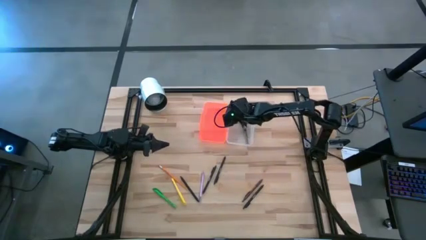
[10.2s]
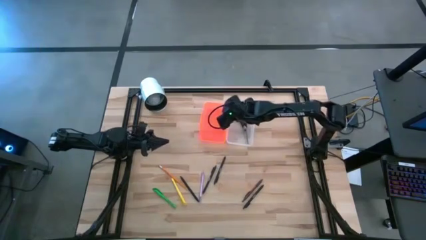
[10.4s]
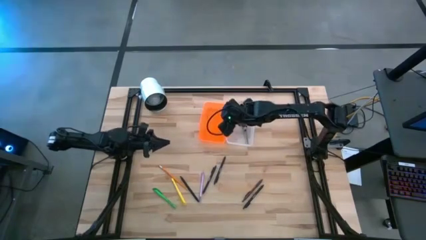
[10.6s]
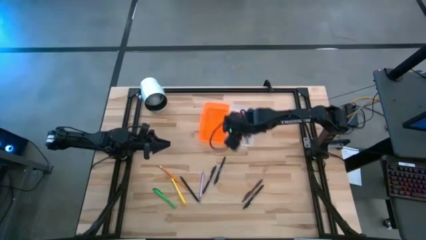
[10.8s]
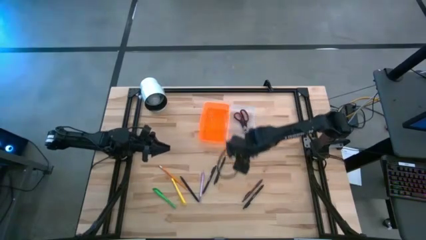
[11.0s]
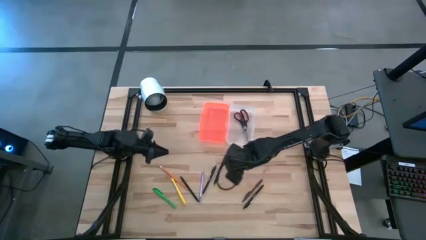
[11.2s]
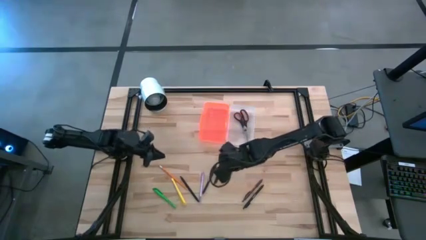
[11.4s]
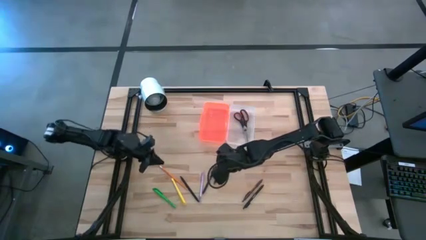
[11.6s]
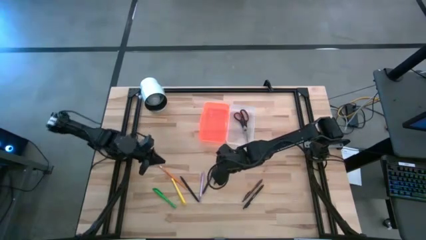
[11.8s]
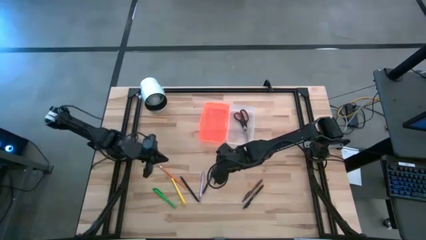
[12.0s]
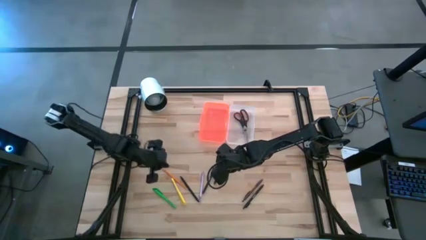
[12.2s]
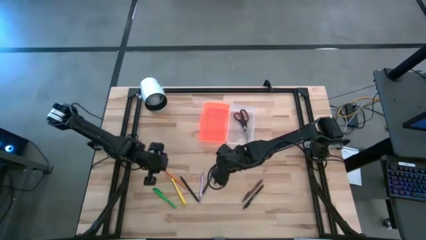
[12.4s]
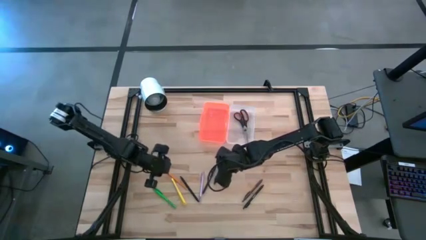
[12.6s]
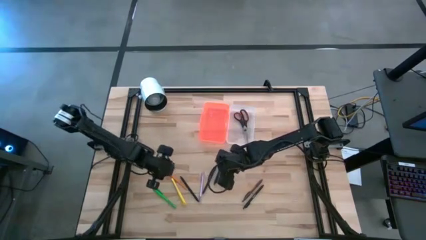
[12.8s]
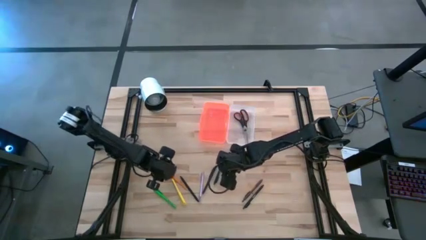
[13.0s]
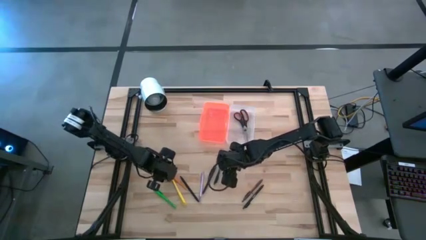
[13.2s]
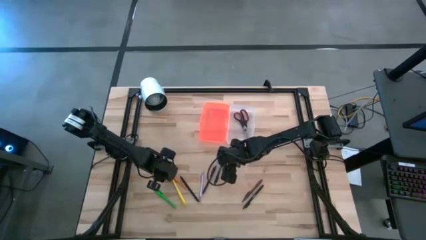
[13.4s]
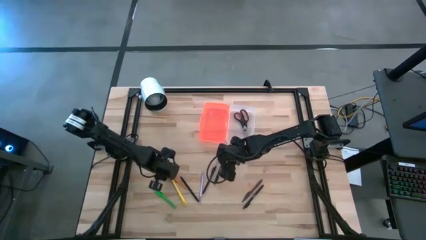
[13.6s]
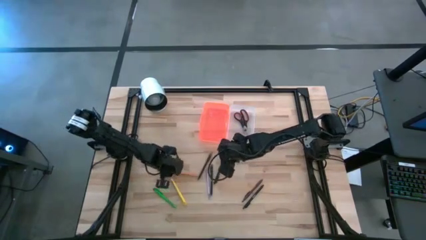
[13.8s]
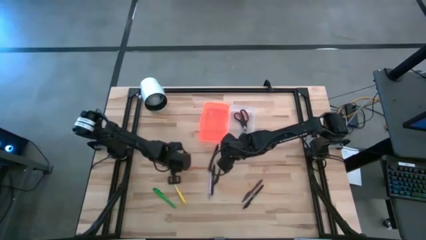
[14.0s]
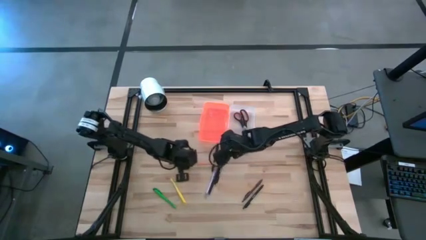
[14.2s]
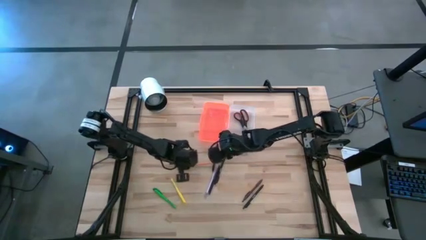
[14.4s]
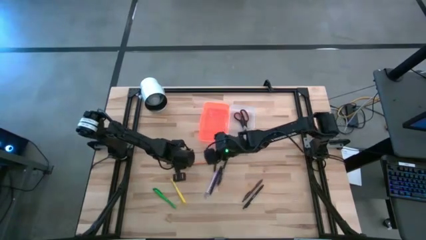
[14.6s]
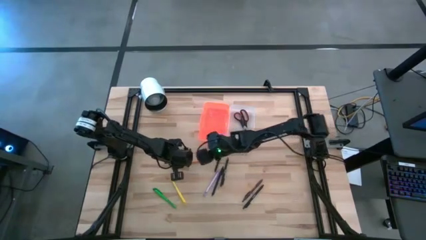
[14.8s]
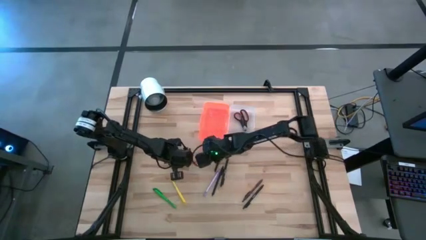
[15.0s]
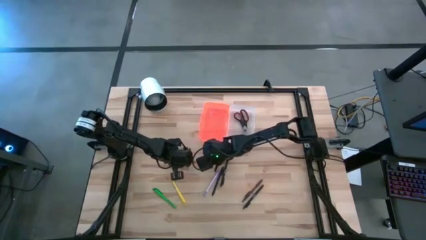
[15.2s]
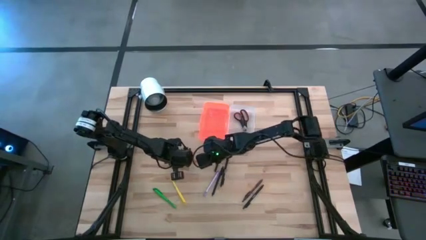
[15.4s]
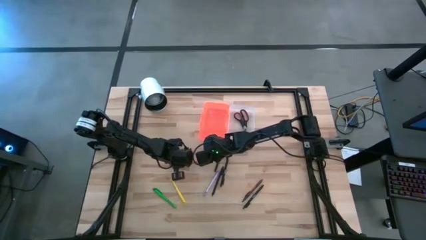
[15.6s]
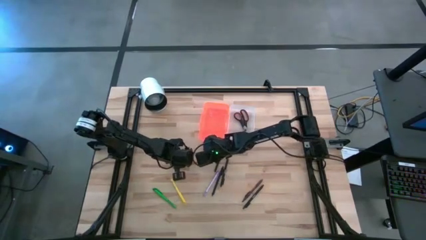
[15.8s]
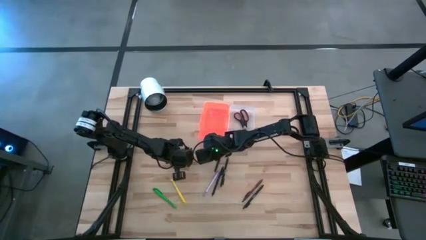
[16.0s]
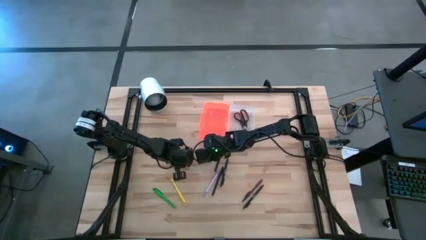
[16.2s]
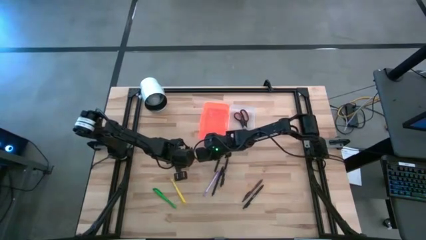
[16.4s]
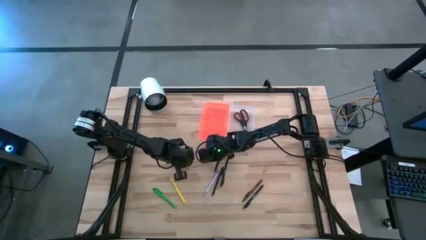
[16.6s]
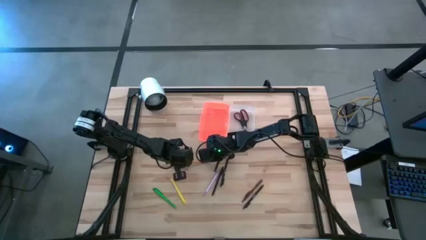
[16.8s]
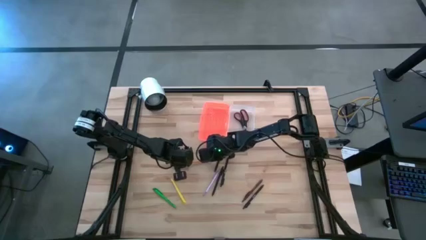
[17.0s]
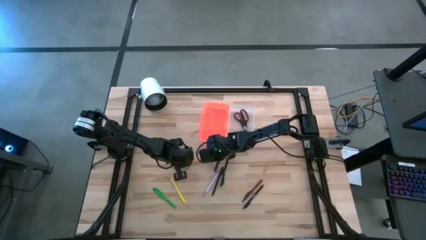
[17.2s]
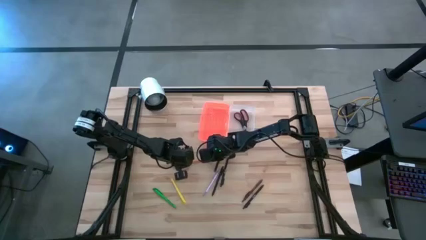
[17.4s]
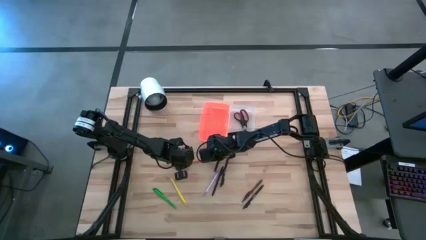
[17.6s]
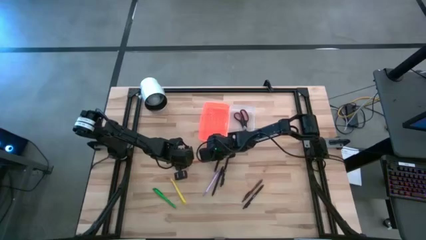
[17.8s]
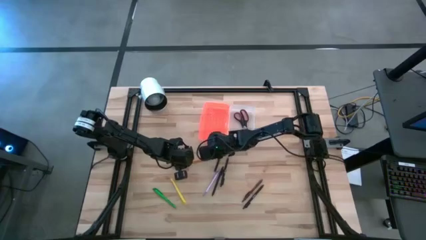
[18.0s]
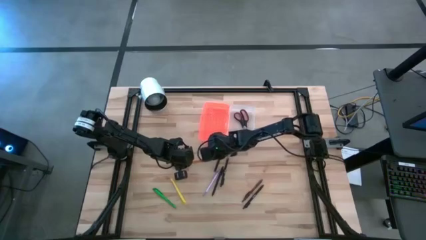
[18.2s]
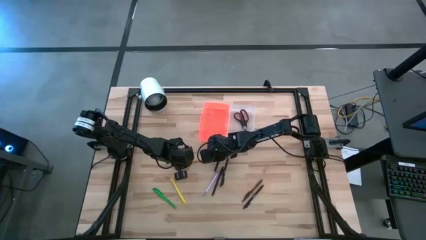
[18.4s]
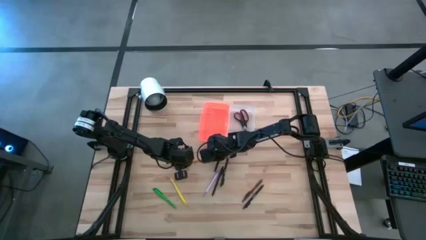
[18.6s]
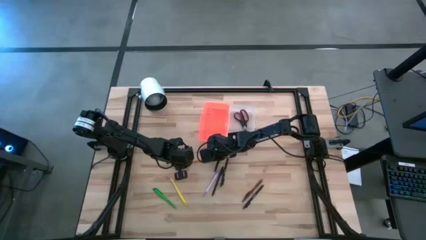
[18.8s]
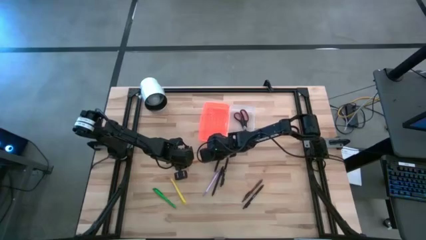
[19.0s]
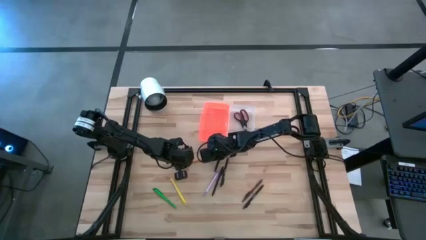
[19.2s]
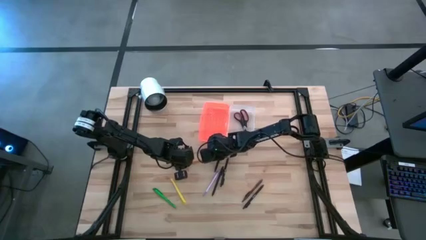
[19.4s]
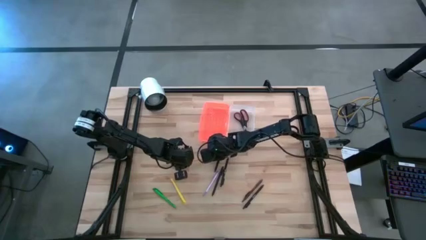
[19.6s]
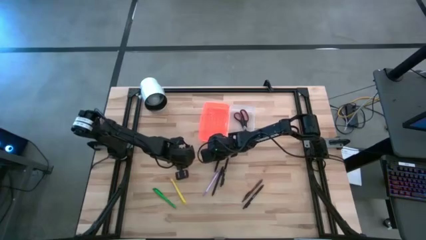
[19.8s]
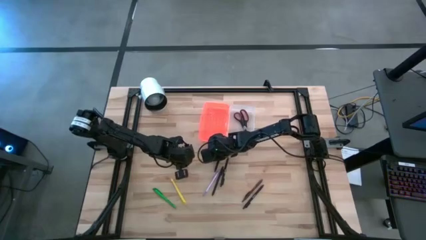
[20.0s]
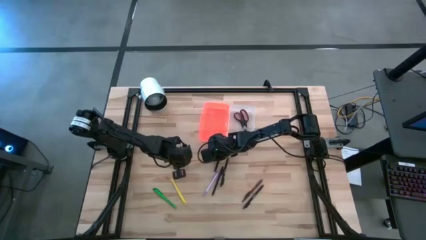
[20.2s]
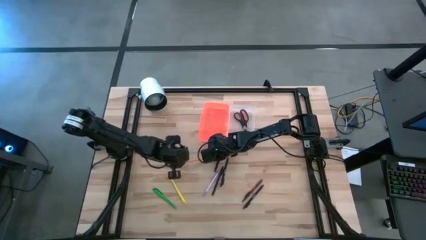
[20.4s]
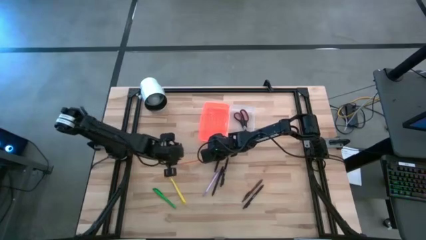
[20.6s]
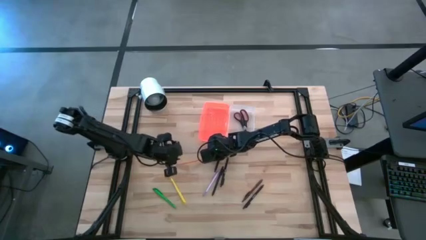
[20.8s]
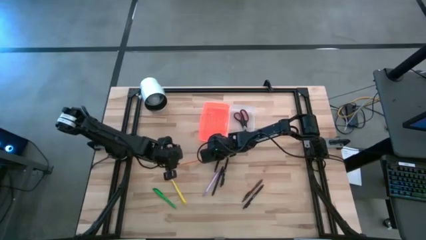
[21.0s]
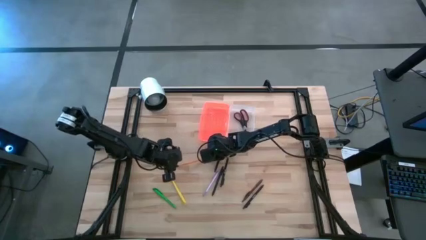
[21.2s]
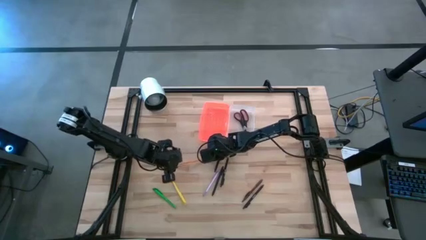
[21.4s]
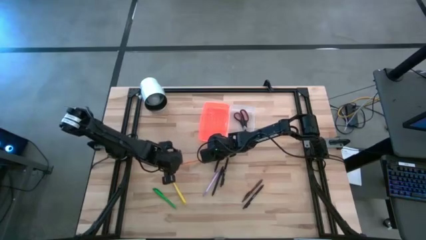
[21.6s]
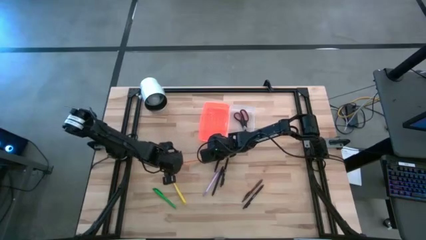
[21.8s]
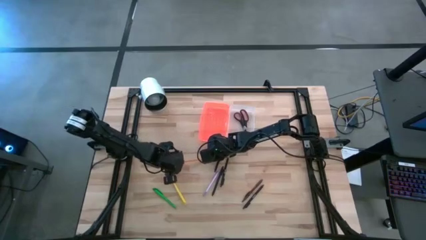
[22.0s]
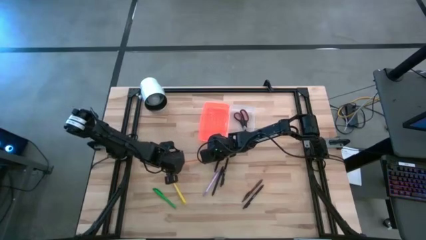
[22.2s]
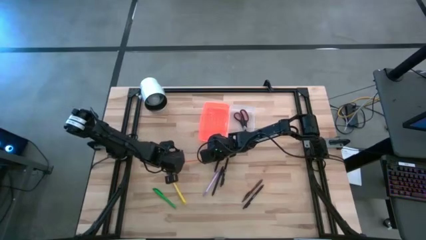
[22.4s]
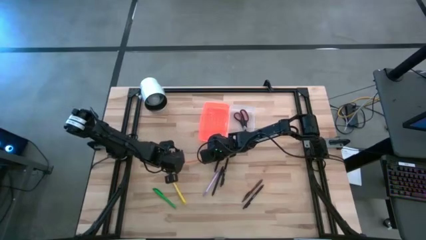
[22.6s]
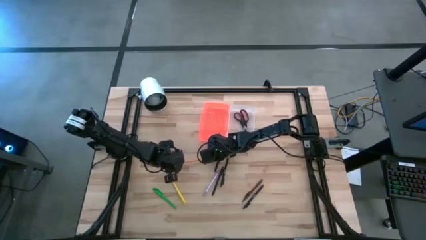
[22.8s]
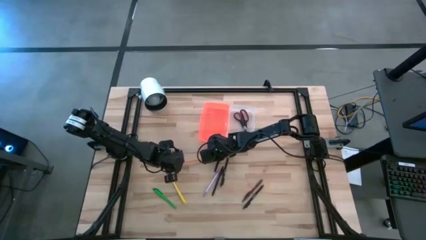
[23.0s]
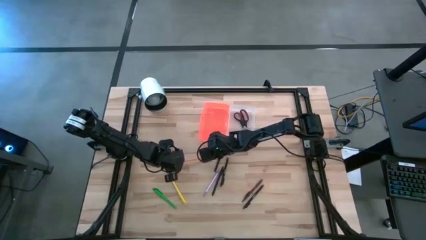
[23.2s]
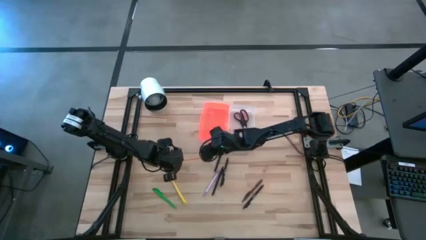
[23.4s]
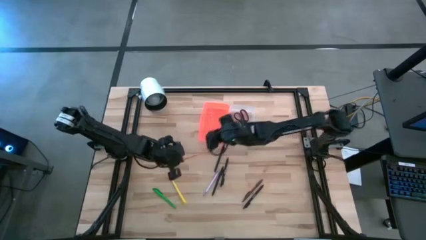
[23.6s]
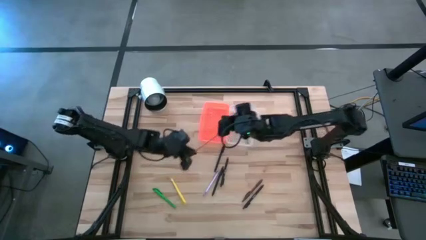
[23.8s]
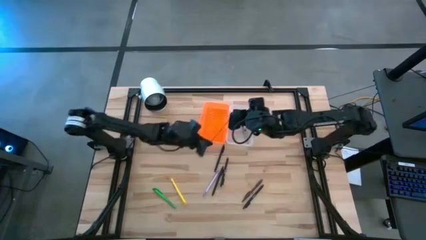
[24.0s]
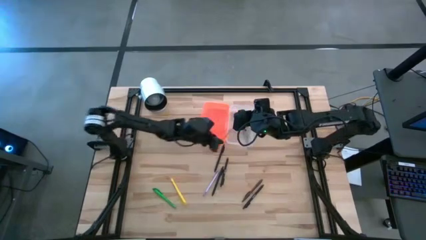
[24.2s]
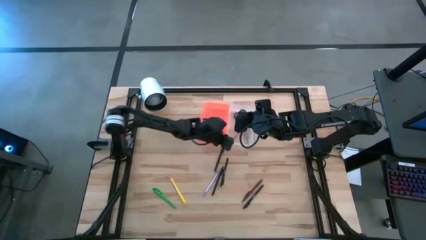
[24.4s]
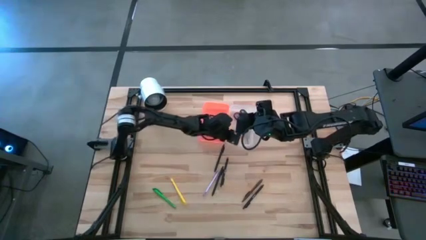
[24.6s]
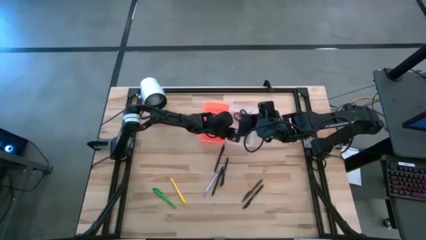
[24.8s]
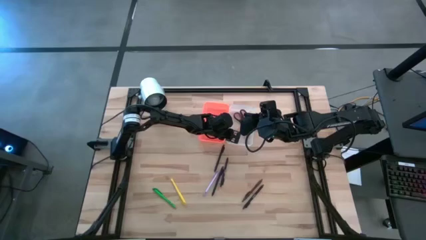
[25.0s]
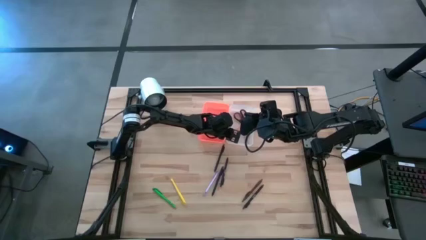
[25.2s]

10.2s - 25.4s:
Task: Pick & place school supplies into a supply box
Put the orange pencil into the orange supply box
